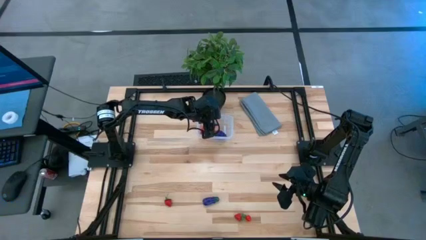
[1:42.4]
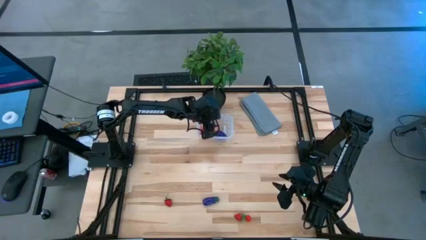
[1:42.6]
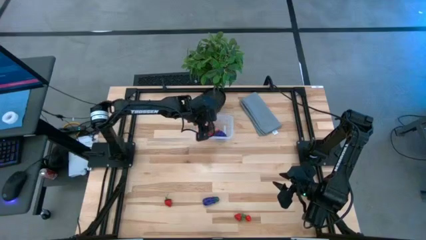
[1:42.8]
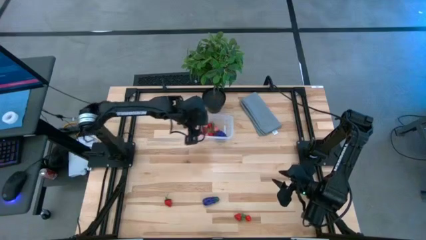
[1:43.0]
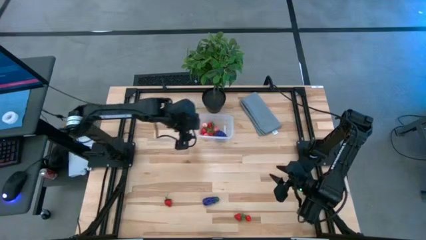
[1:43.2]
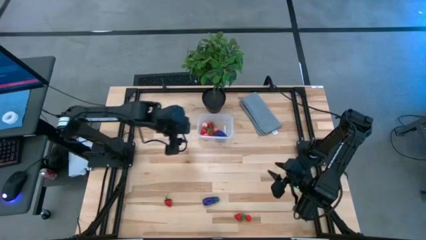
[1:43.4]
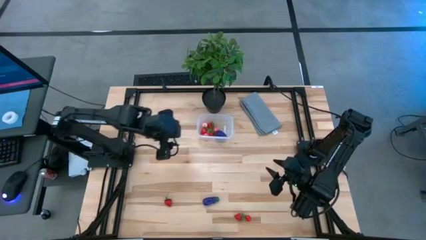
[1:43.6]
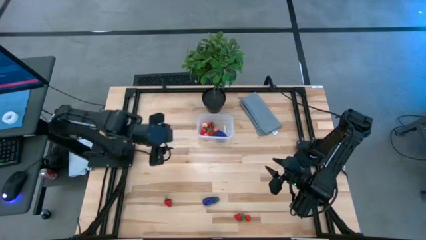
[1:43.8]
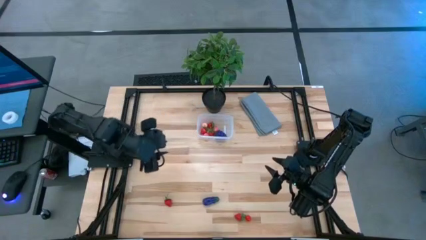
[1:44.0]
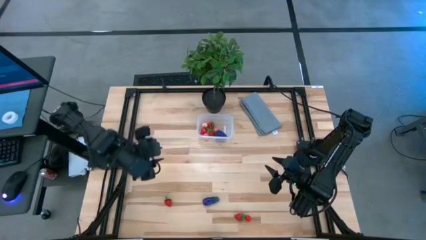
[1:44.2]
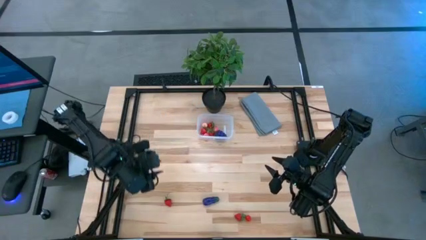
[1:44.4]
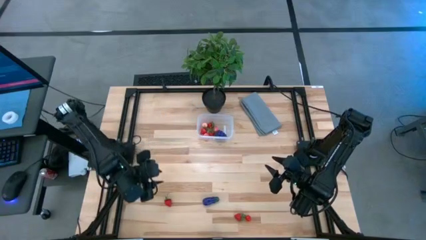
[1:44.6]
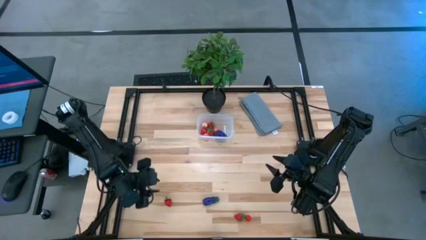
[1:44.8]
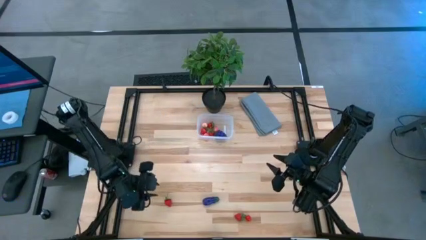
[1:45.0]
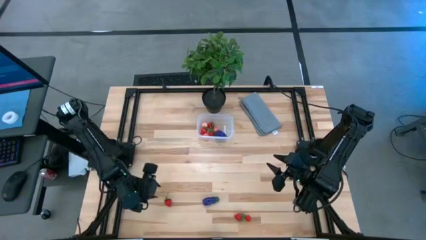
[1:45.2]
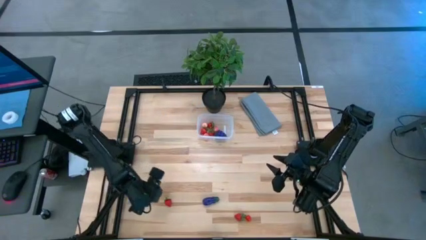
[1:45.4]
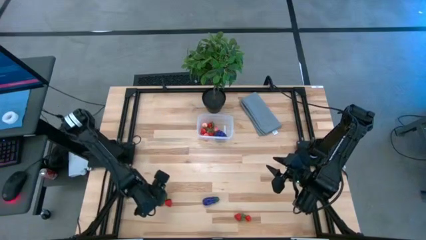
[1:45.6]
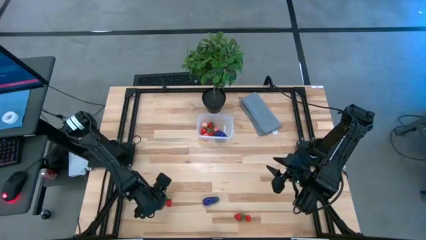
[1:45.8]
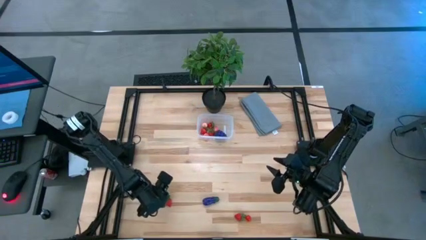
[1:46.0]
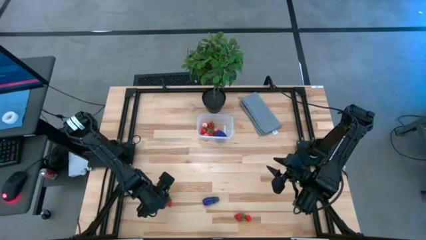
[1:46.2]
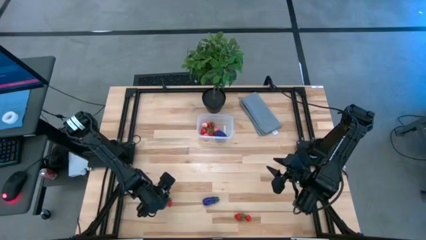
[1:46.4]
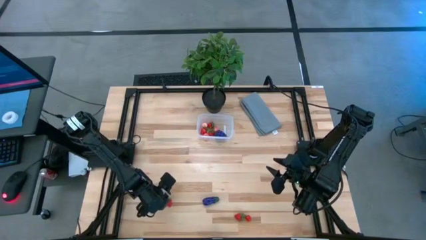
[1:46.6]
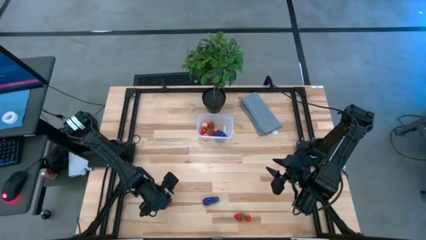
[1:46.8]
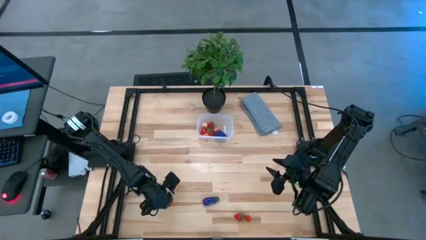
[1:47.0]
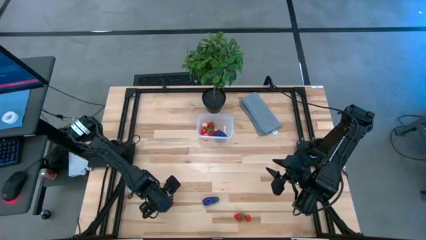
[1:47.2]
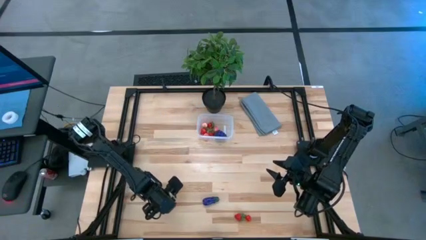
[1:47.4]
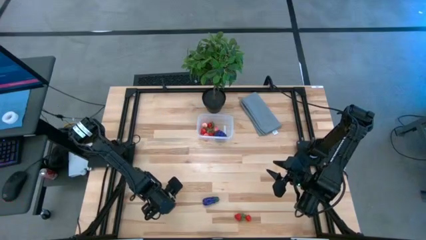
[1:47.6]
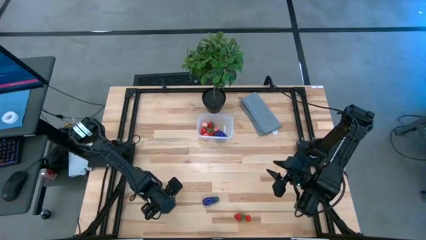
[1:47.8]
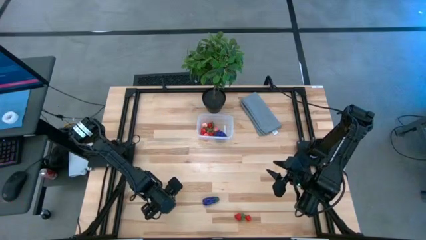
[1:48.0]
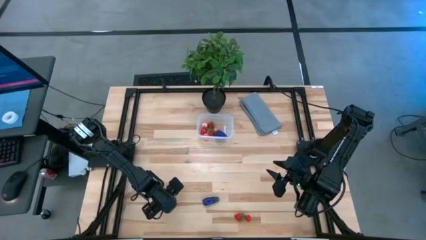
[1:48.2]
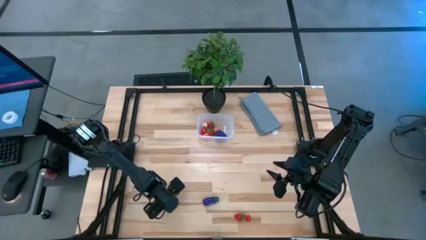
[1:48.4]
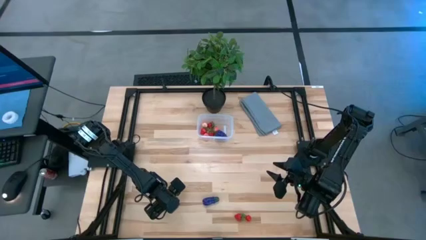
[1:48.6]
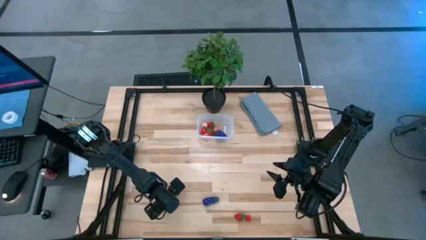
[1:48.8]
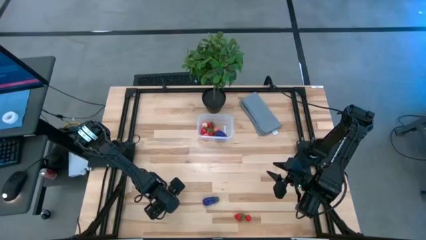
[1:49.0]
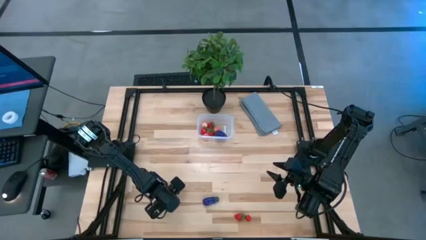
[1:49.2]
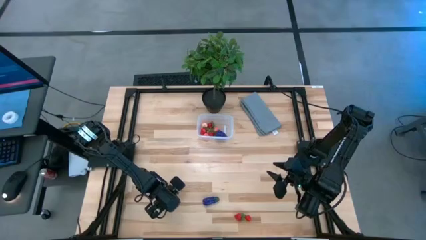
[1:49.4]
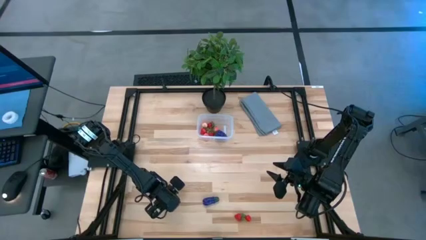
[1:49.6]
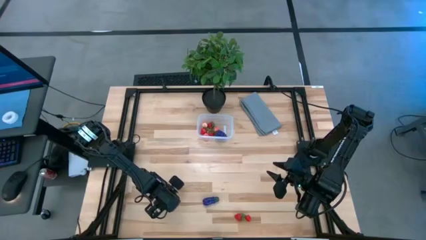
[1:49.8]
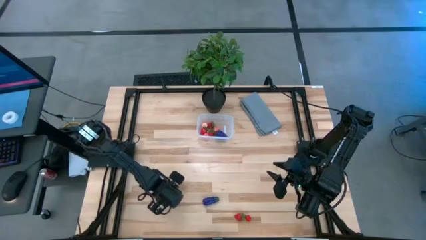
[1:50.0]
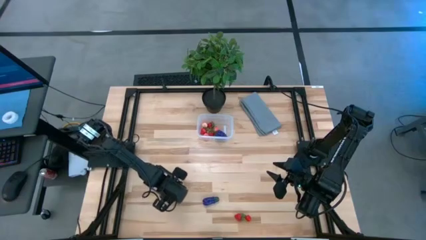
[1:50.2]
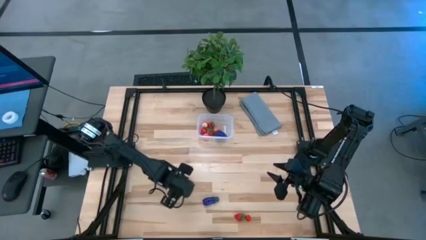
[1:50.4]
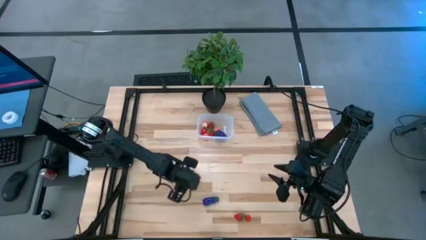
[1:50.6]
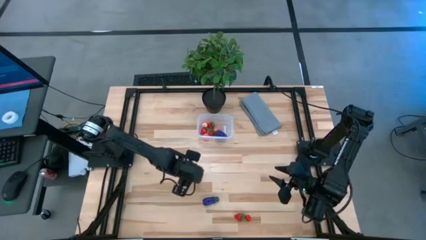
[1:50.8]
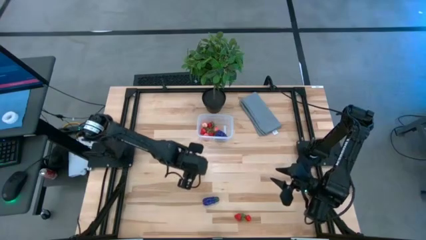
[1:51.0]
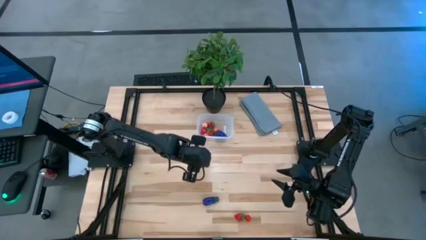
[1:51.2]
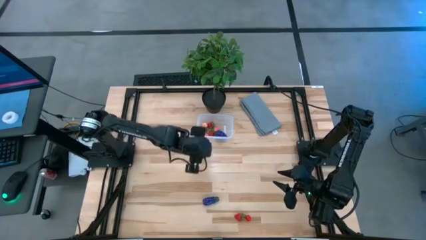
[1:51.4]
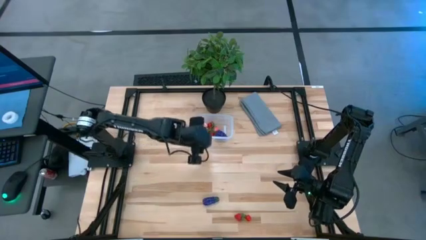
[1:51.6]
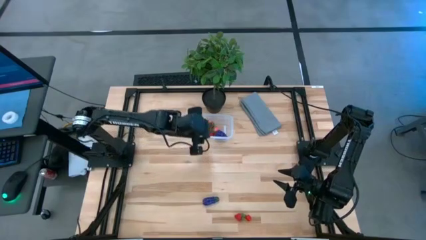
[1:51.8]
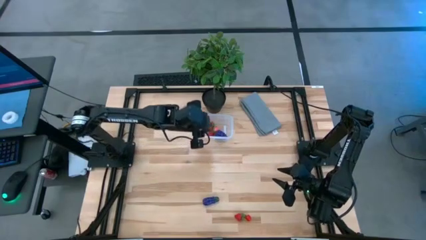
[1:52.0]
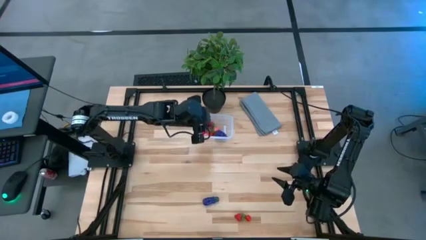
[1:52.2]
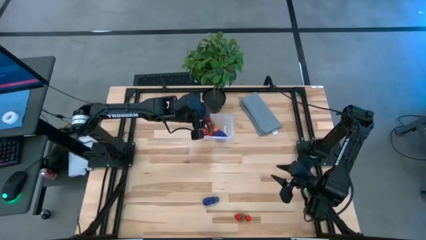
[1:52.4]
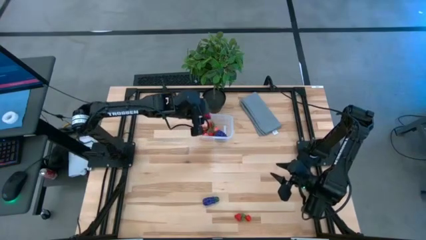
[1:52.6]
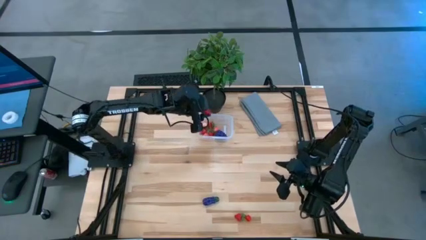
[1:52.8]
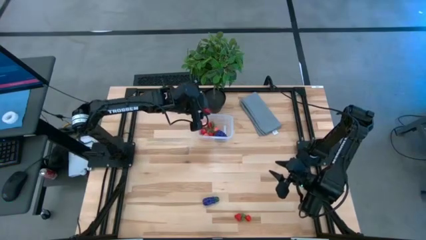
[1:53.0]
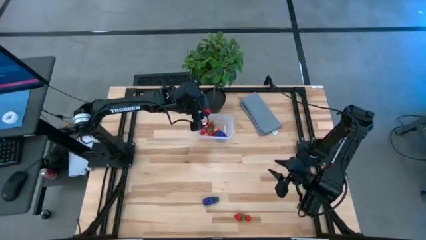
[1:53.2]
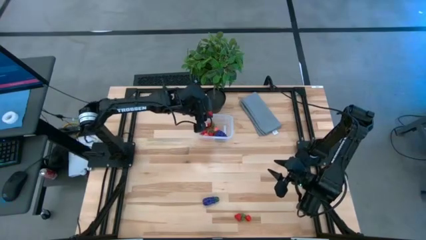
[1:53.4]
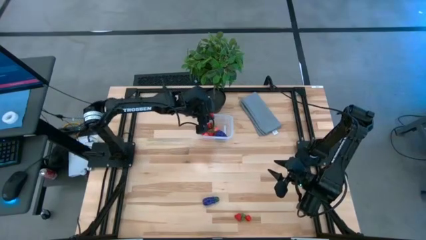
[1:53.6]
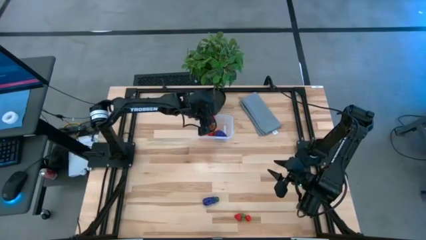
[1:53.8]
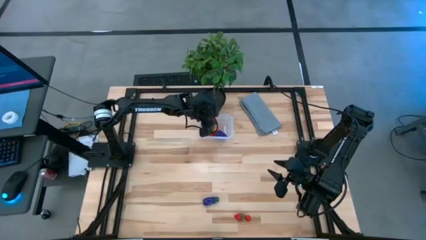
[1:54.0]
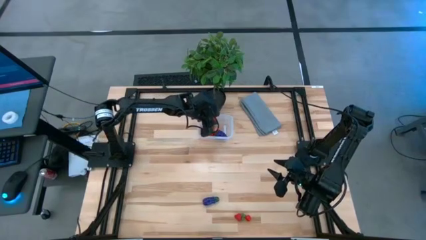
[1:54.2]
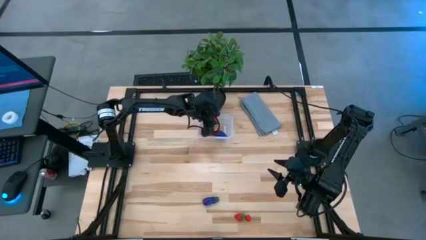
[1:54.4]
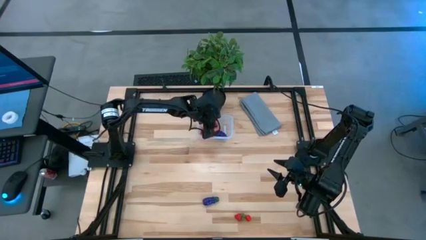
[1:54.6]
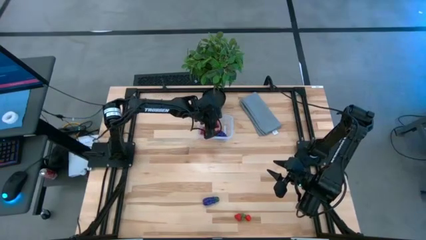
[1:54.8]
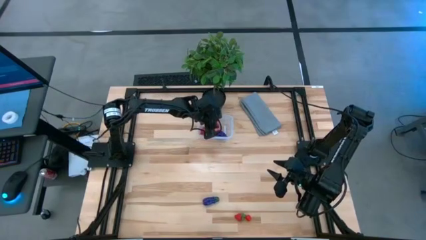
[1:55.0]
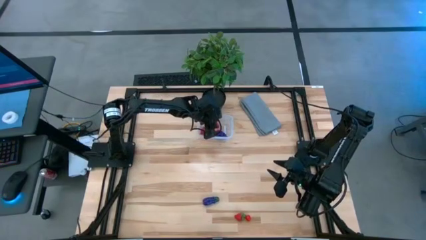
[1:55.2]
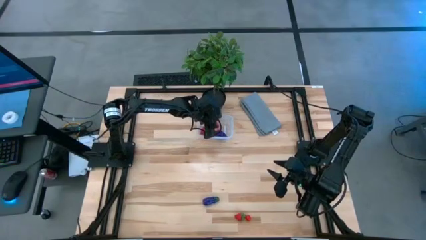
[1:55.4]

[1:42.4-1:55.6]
Task: Pick and placing Produce into tupperware
Put the left red strawberry into the transparent bin
